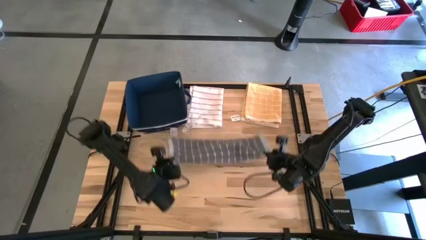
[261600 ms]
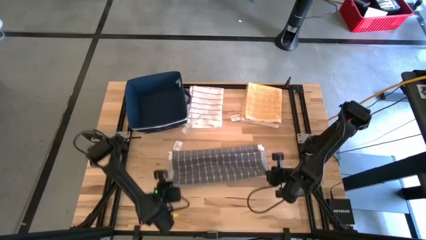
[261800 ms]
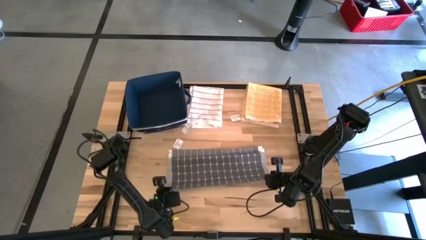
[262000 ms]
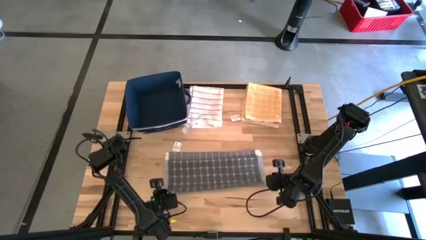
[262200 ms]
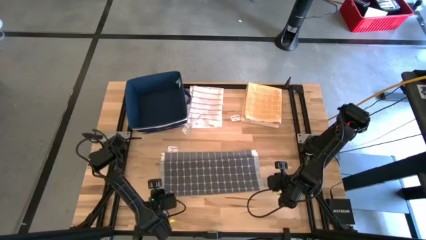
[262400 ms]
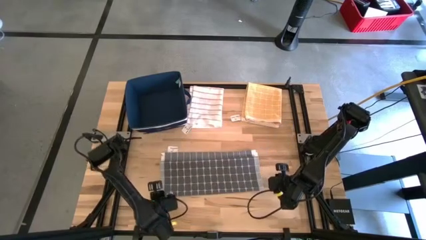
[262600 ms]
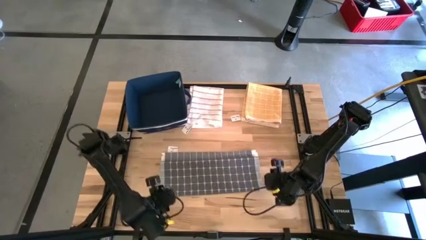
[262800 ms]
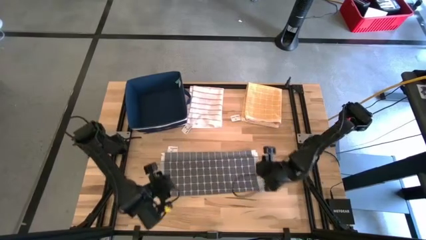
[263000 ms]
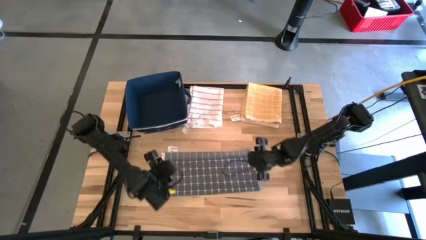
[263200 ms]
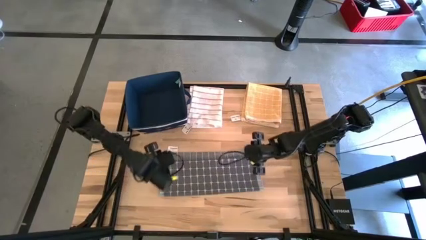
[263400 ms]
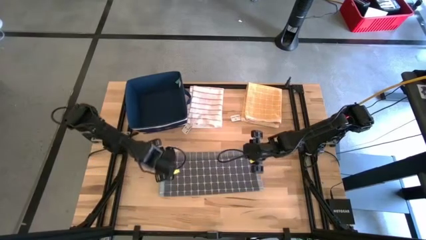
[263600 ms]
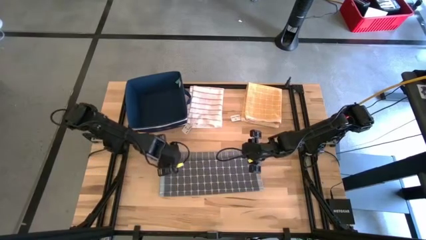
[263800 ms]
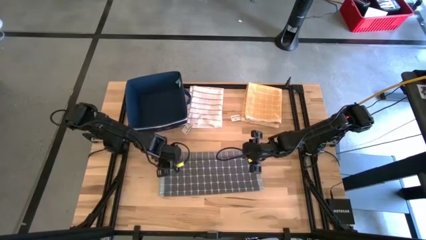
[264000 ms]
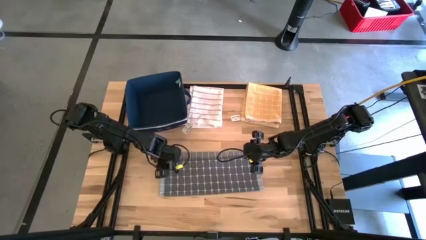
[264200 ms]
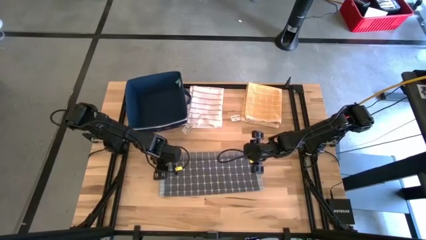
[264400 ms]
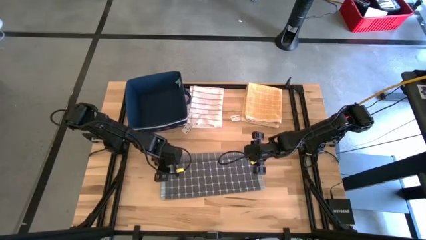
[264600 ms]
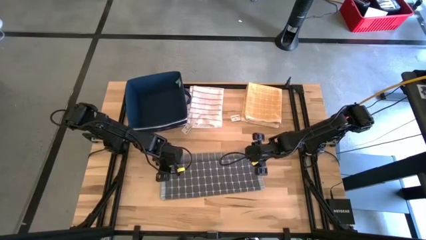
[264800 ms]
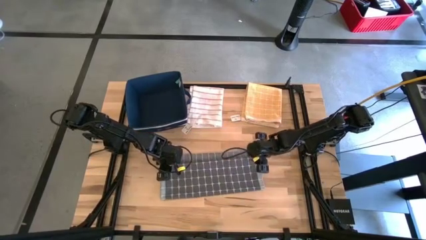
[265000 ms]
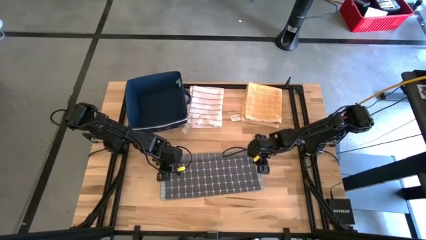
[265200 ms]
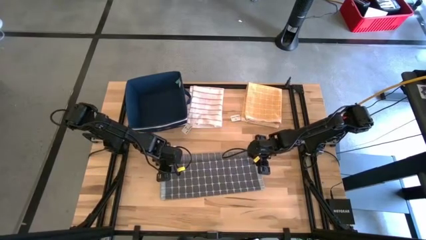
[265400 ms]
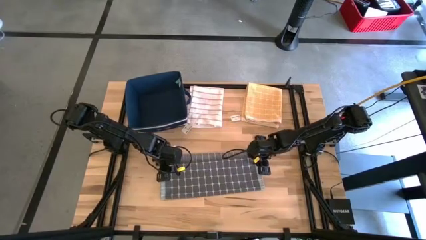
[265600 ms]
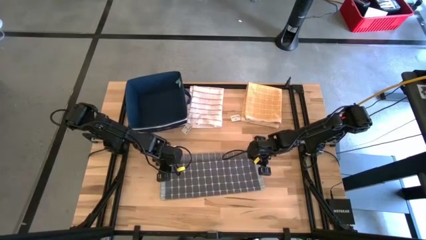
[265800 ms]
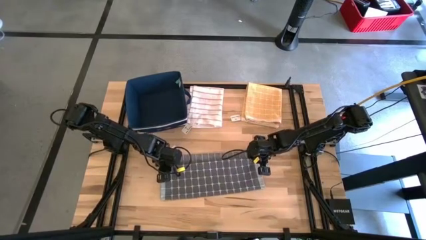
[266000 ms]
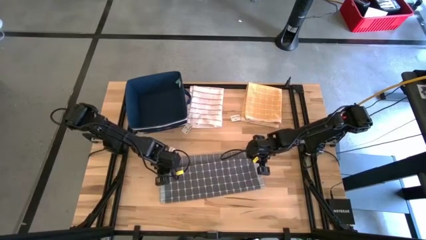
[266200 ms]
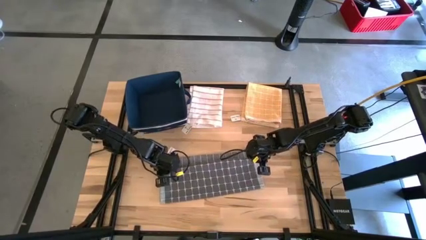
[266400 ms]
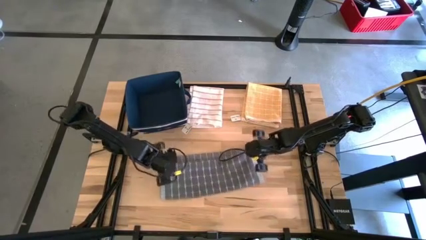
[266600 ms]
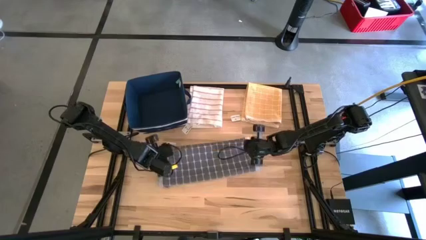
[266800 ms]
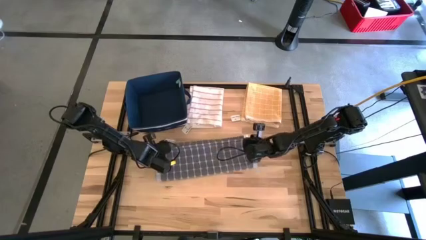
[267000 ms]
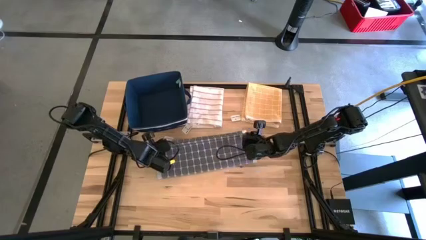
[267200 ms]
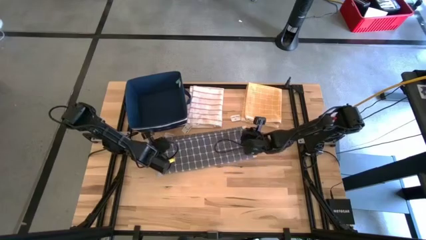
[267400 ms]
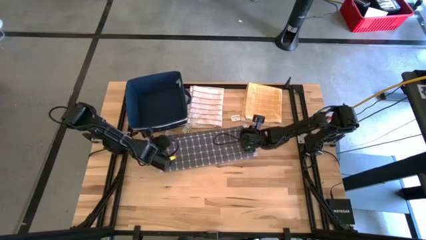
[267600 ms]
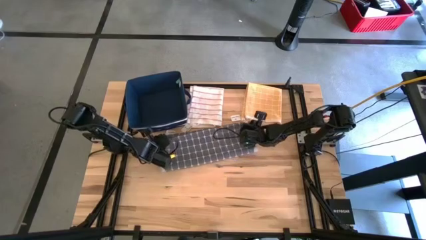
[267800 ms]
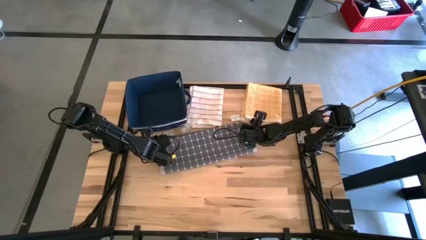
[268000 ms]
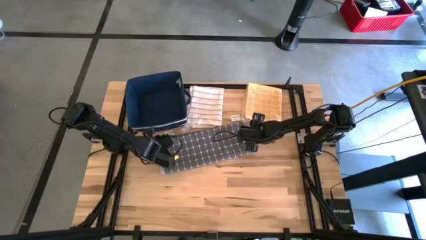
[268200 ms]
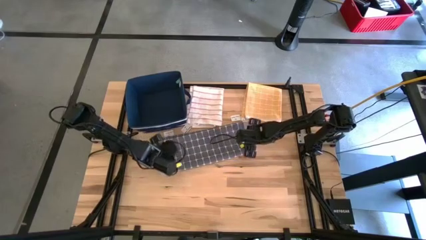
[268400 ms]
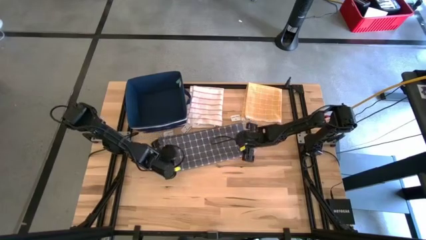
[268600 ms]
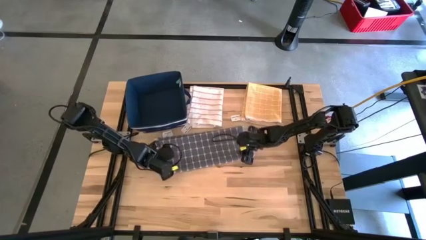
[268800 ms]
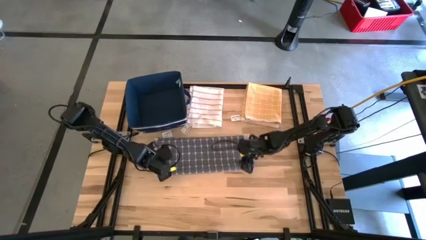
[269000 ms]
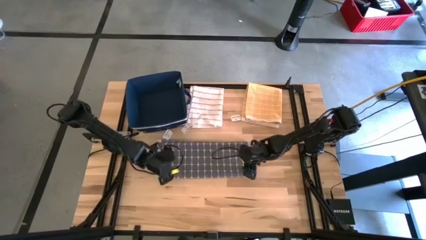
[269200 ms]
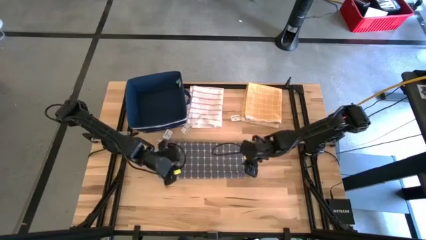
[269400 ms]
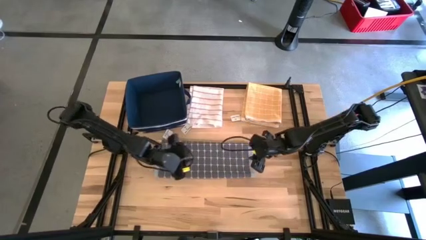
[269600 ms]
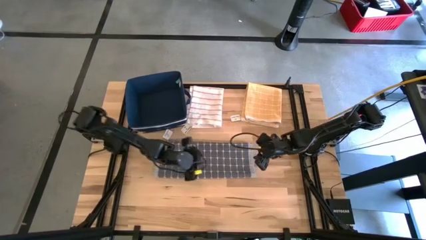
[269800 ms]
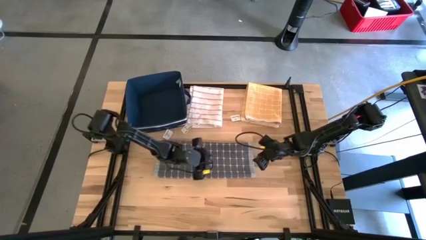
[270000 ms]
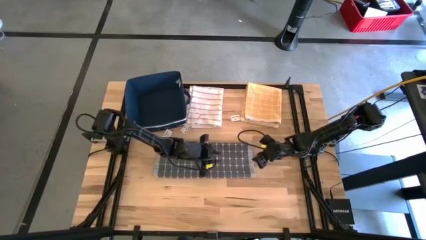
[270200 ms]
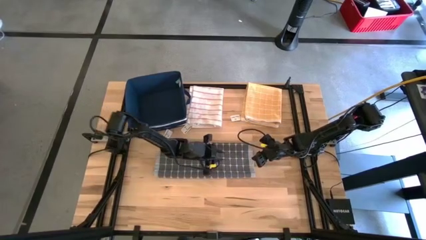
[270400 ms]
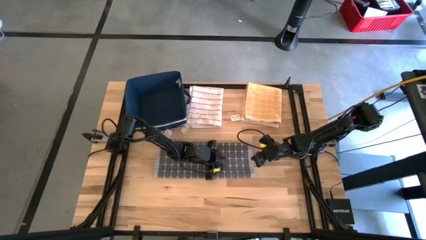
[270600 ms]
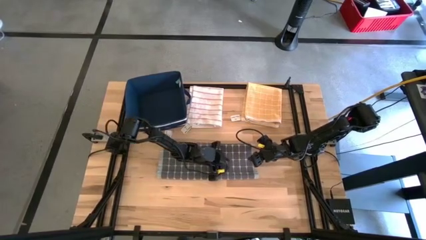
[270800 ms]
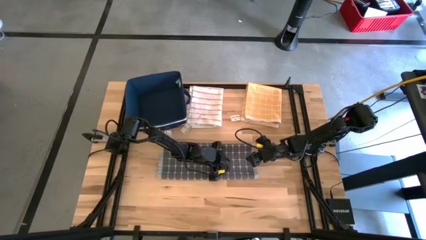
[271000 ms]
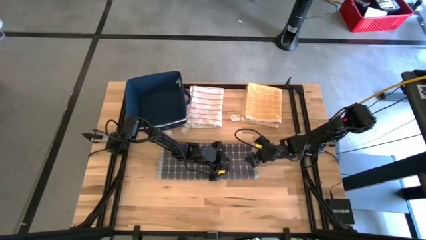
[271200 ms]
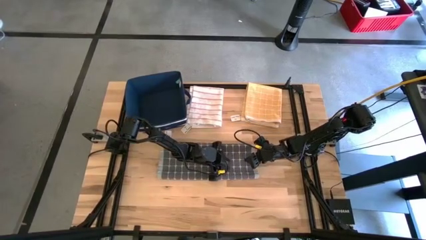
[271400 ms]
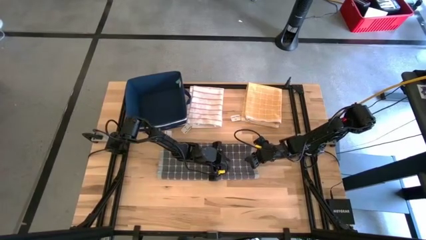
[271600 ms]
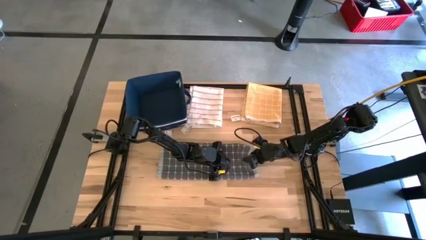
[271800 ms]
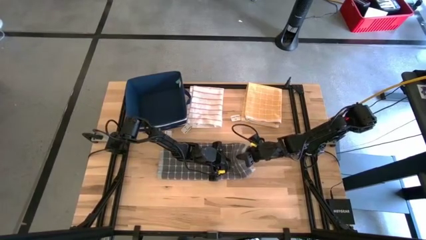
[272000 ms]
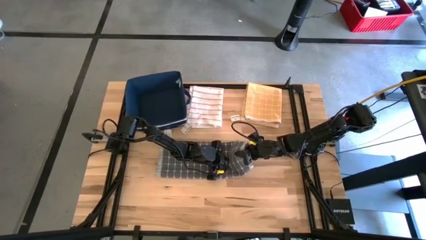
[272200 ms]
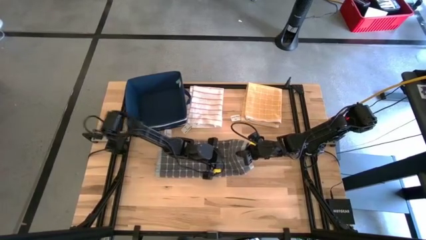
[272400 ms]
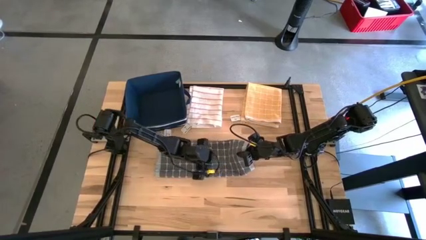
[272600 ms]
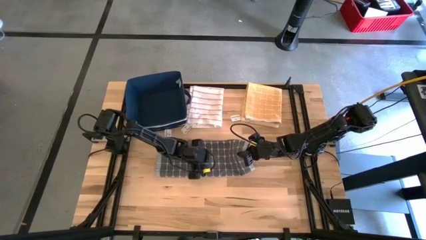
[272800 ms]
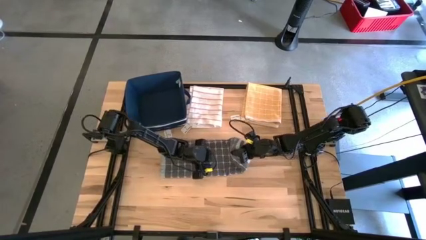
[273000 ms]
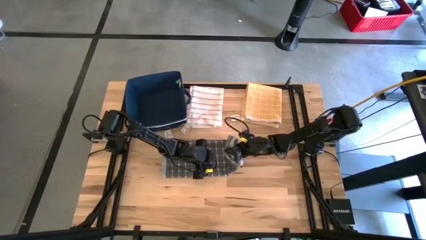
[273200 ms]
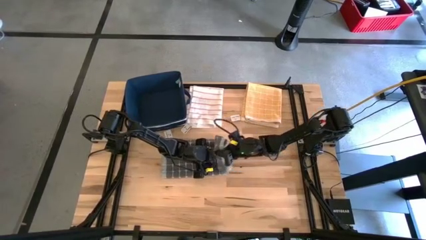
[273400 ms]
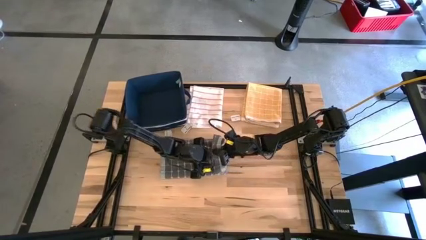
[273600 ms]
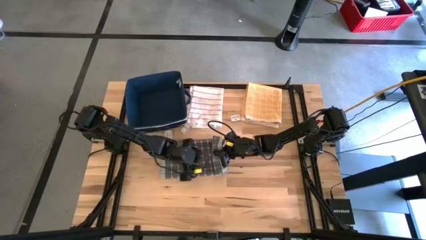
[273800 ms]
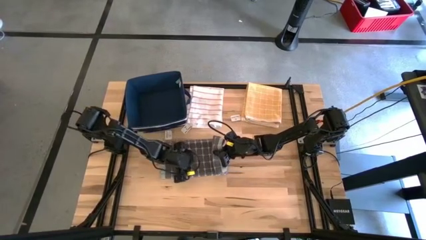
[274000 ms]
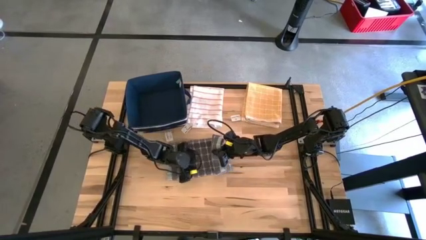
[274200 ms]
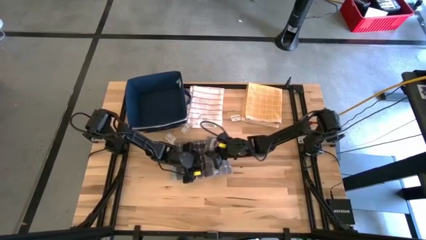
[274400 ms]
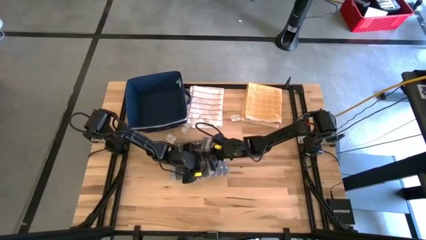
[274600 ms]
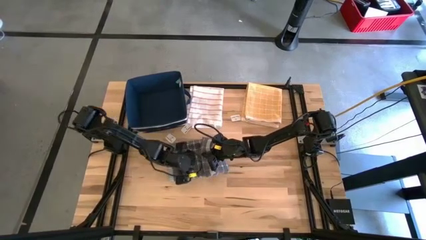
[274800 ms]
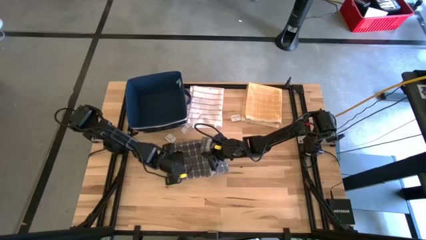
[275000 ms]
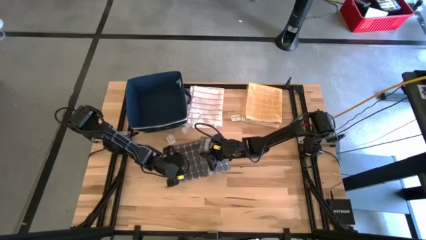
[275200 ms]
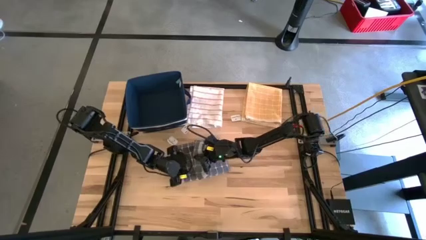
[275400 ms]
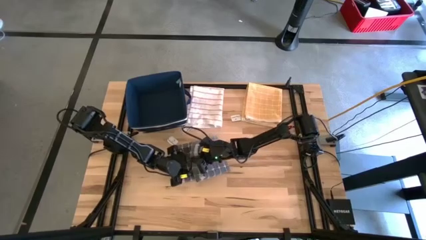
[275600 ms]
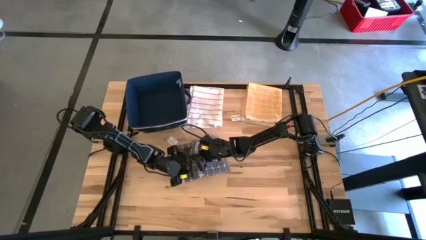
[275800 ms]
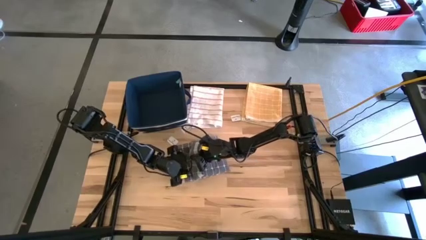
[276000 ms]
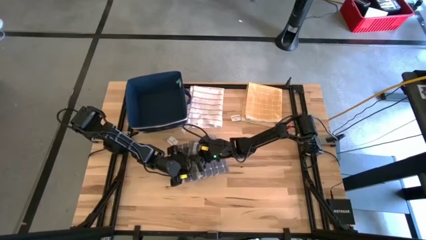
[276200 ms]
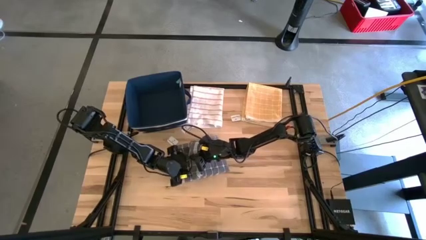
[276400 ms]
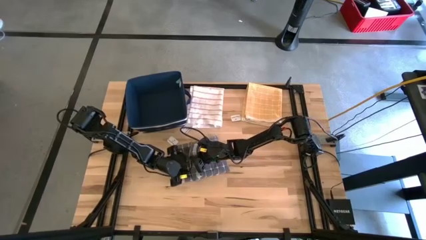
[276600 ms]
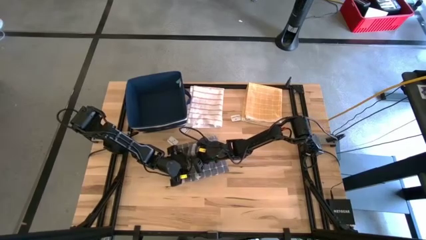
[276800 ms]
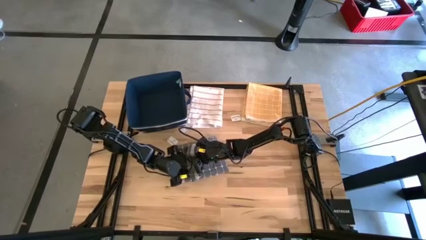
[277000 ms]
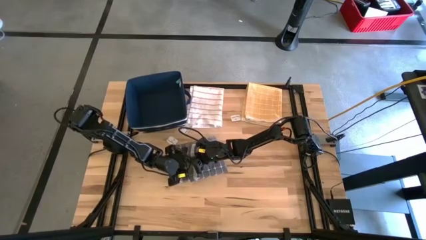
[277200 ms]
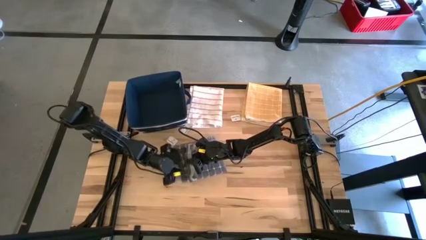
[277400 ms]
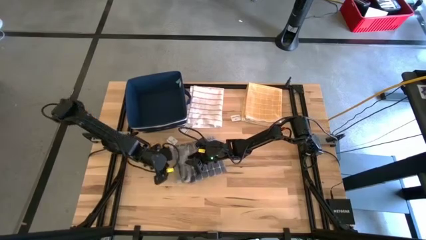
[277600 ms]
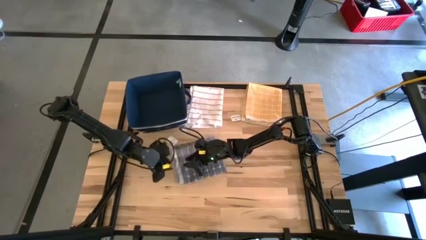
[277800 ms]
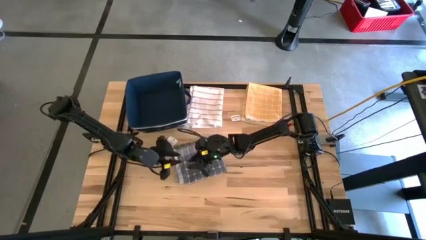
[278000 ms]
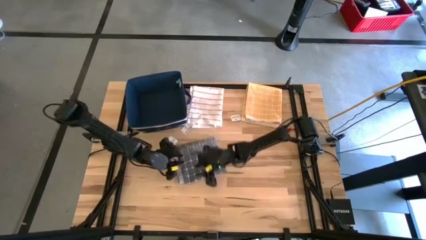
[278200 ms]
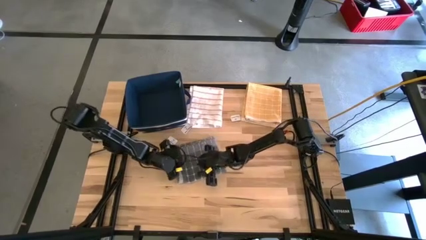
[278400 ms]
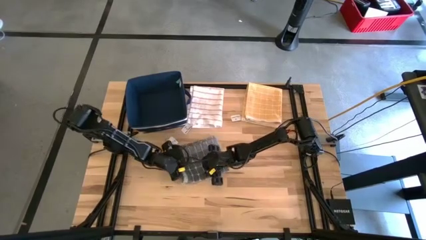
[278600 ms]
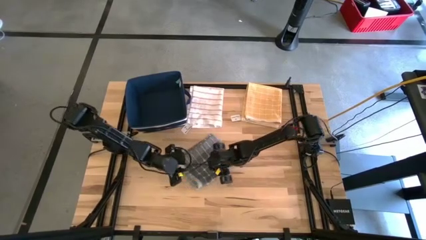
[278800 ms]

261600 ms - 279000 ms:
Task: Fold towel
Fold the gray towel
